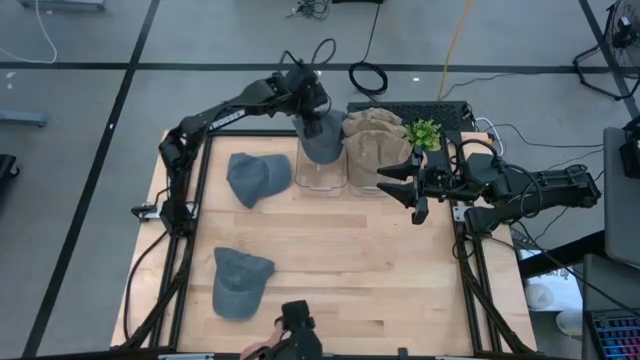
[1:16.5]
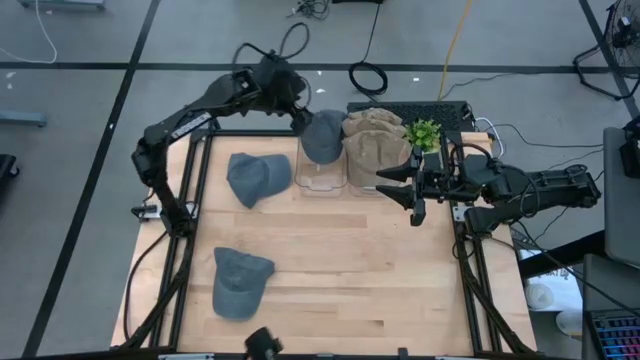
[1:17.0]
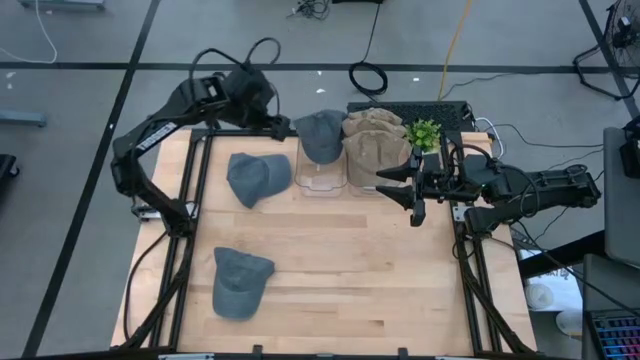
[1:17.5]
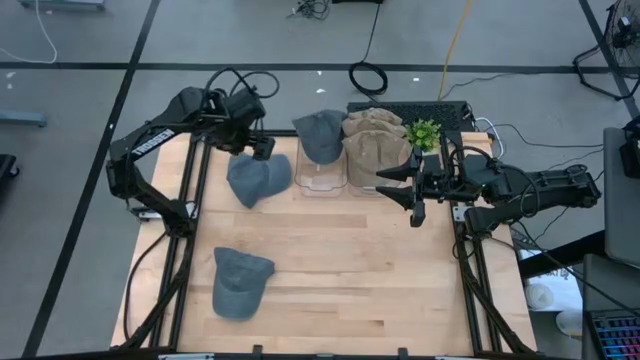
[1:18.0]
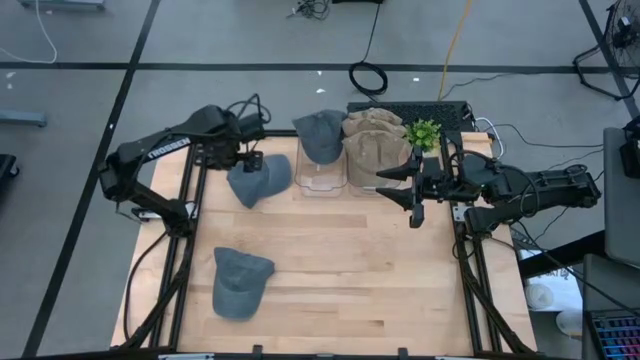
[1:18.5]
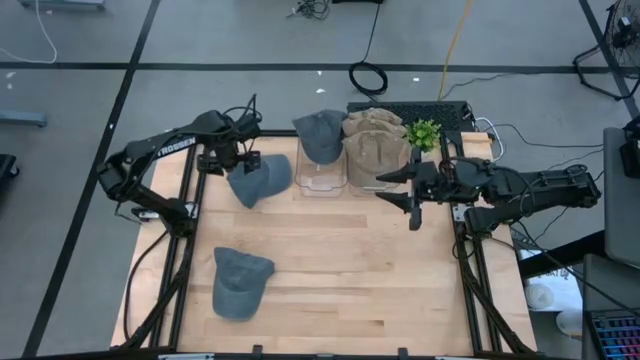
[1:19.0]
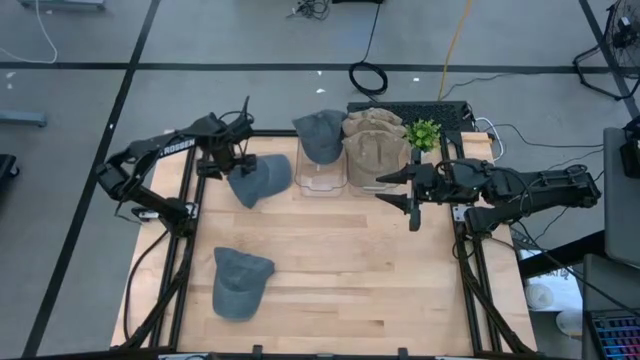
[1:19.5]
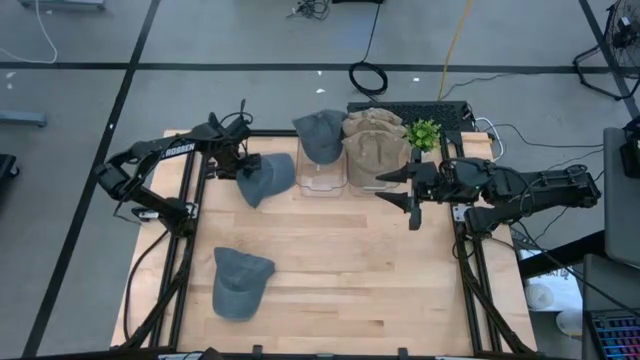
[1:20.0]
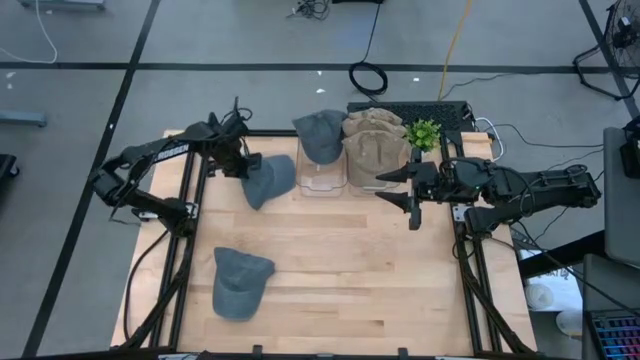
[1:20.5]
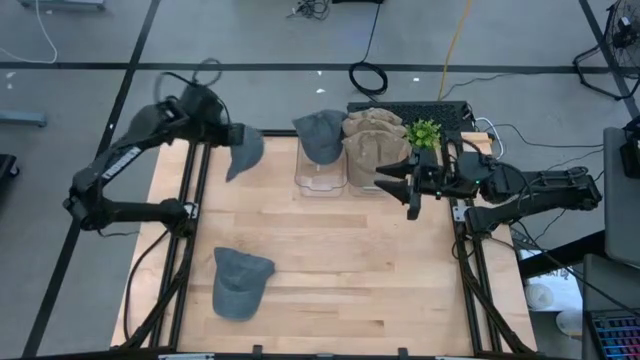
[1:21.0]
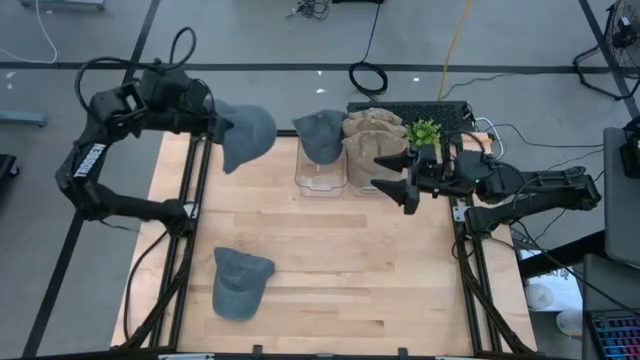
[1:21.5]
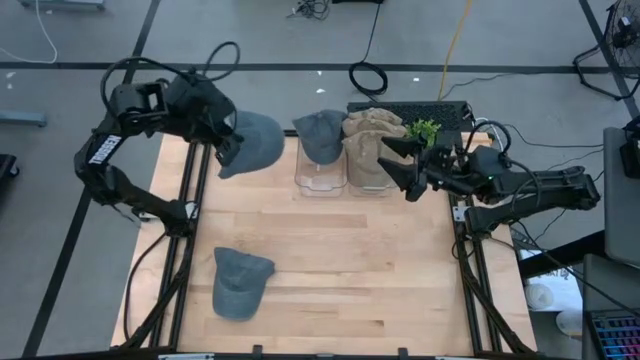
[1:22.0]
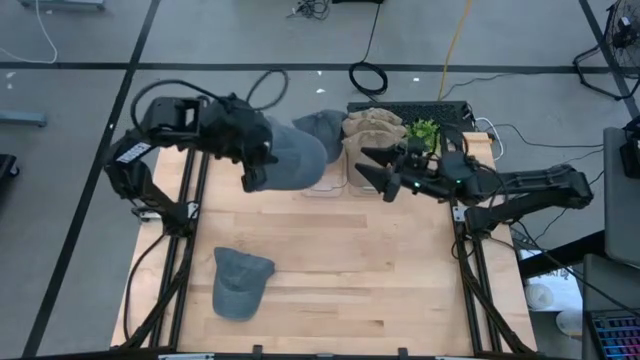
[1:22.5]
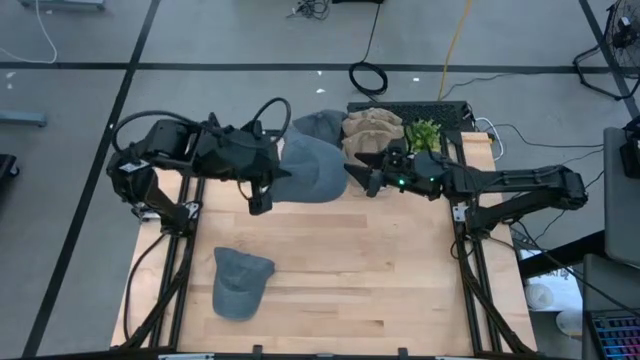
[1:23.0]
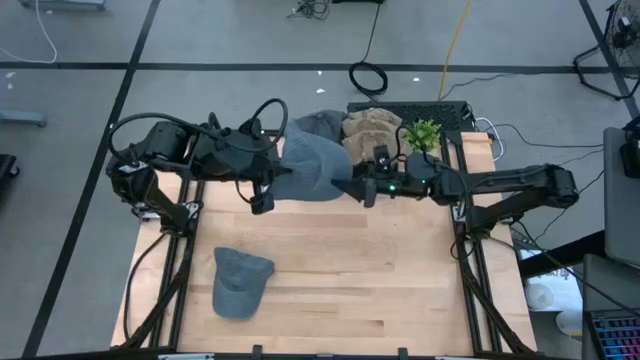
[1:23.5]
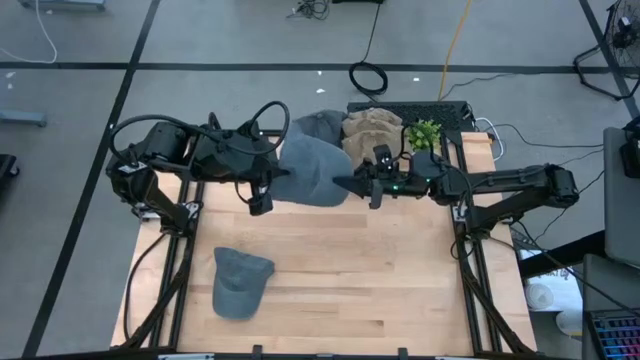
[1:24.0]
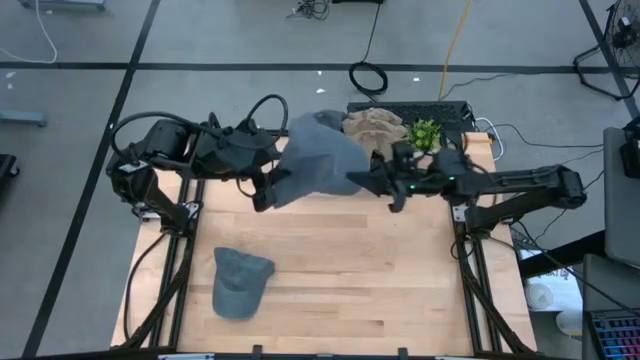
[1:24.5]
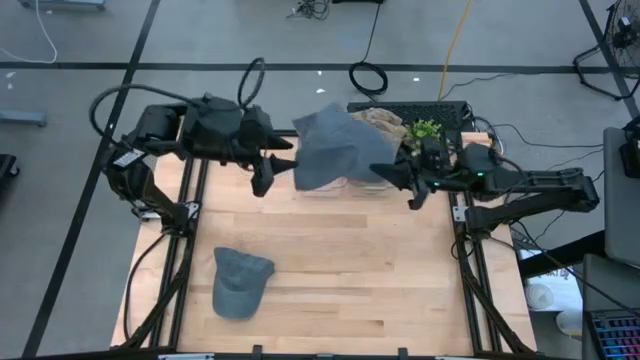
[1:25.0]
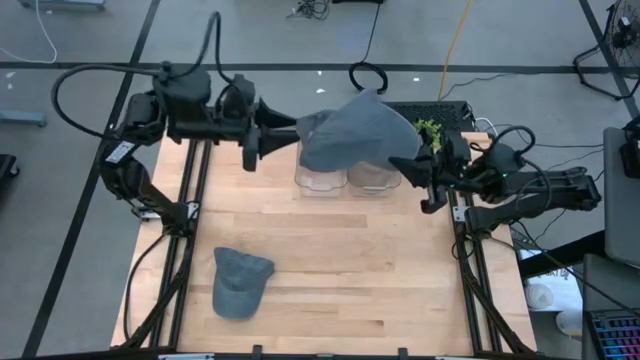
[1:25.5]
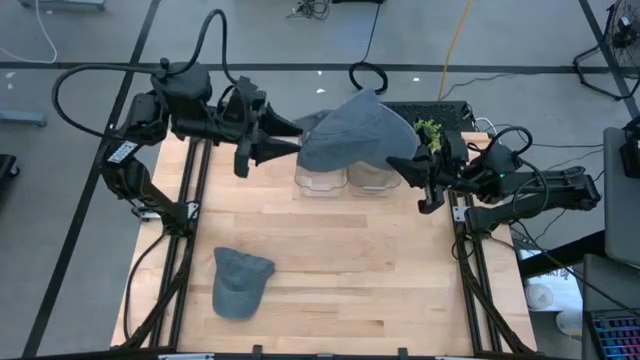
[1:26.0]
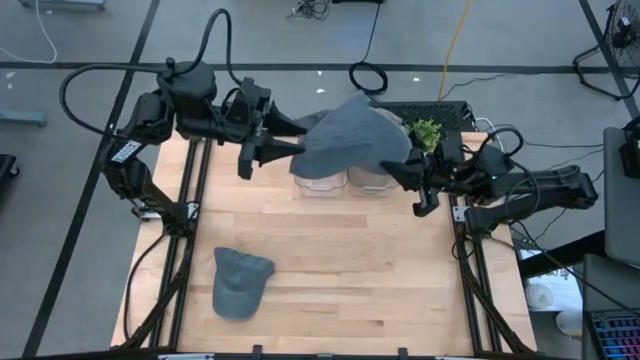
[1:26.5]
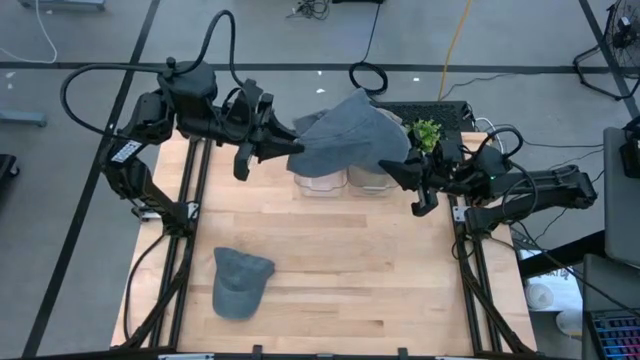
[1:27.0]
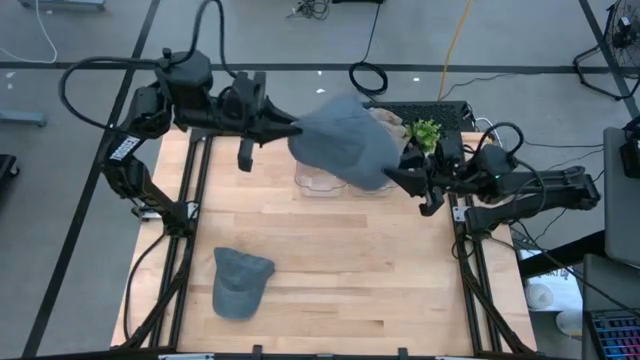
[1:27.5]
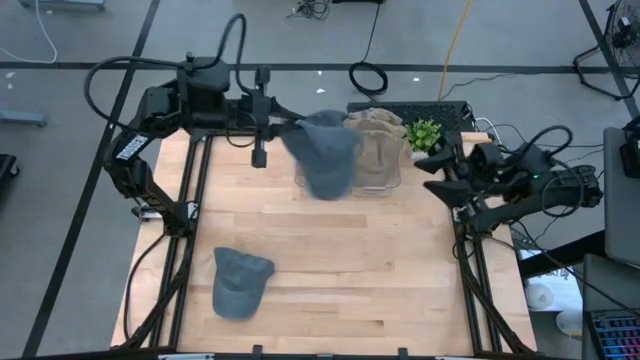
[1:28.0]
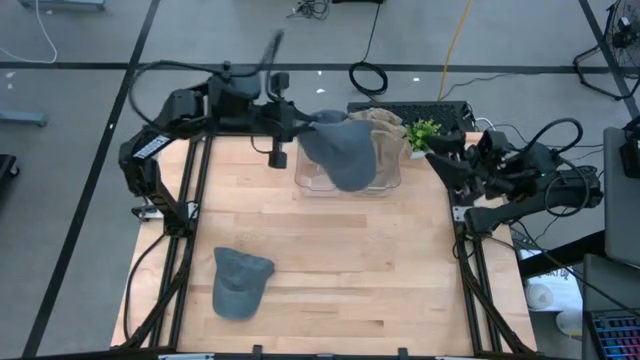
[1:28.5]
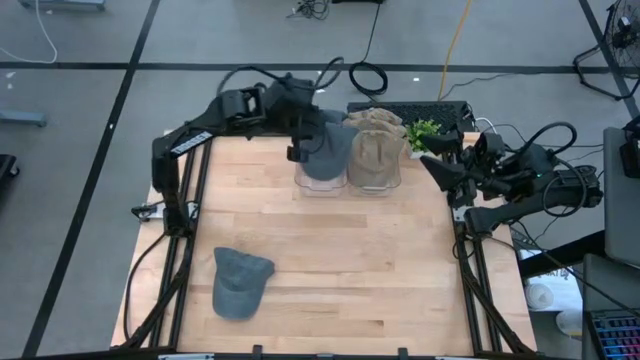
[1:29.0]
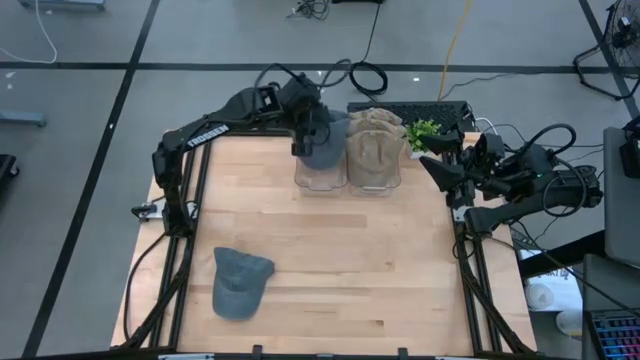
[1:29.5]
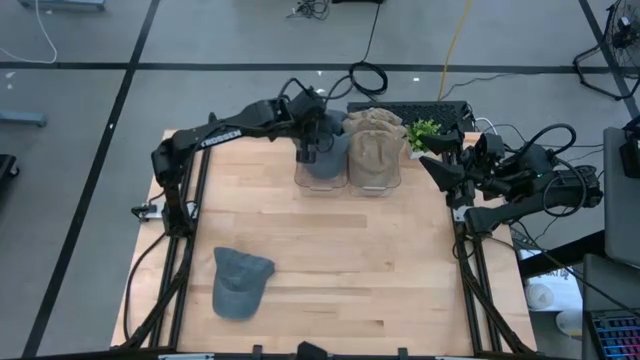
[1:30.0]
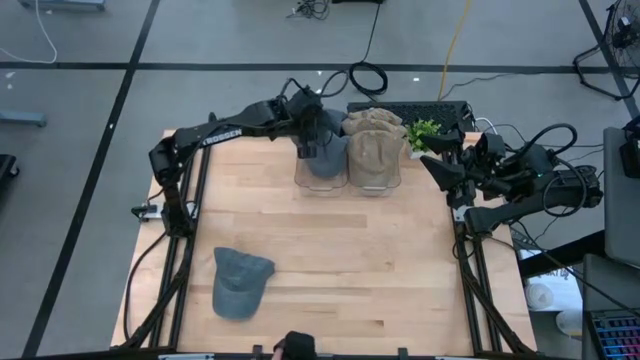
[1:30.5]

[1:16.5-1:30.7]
Task: Pick & Place hat
Put the top blue cap into the left transparent bin

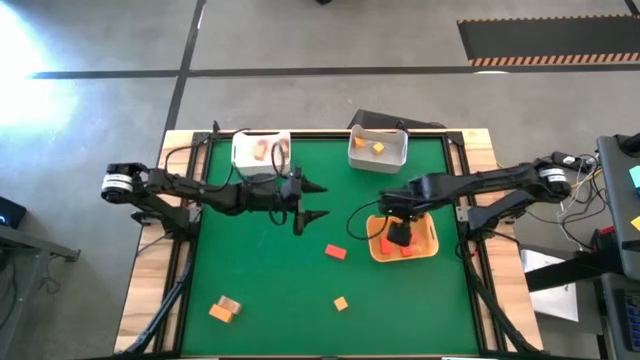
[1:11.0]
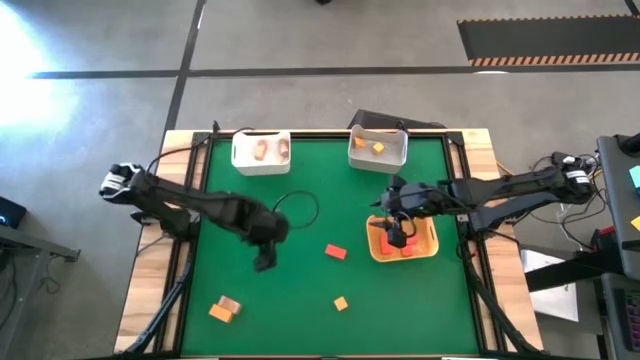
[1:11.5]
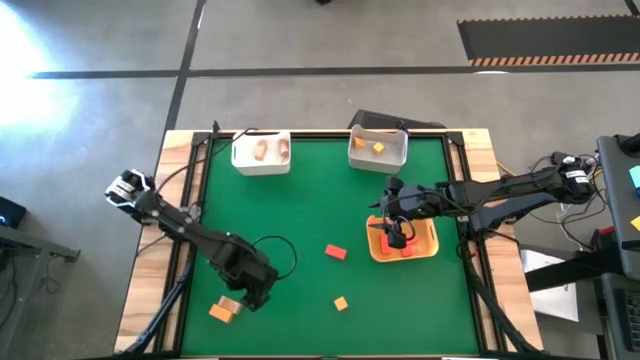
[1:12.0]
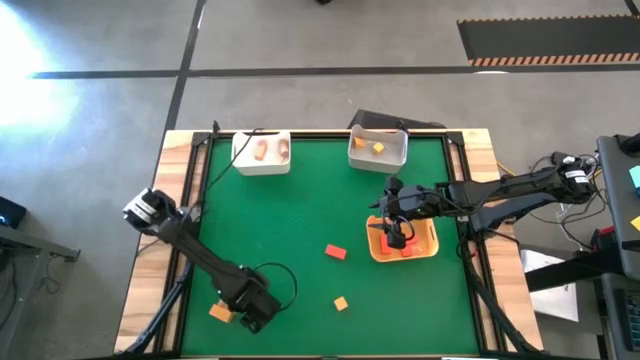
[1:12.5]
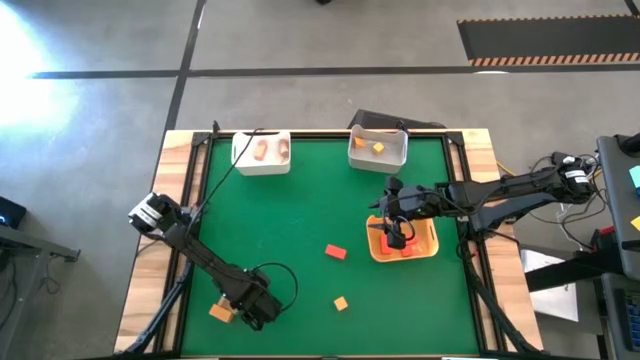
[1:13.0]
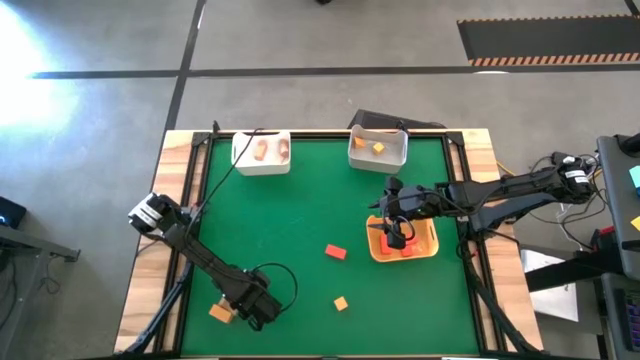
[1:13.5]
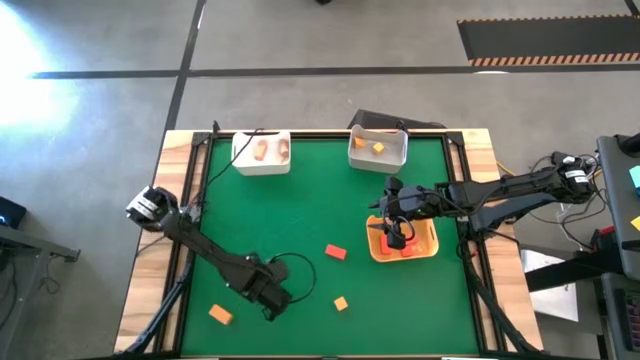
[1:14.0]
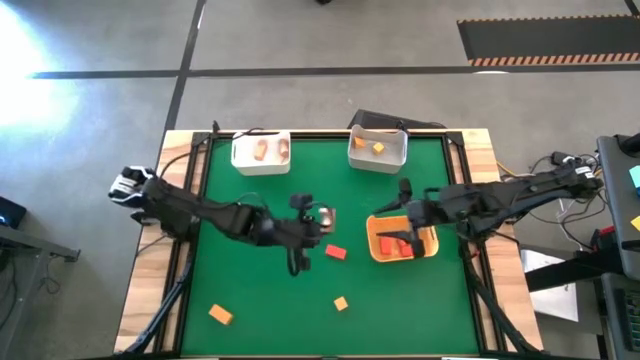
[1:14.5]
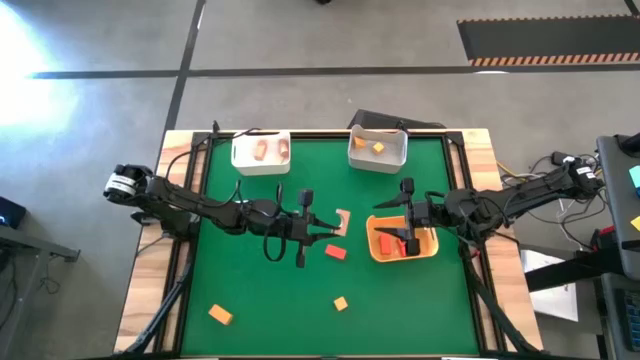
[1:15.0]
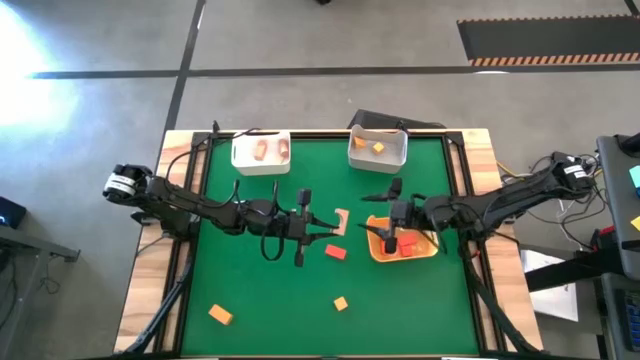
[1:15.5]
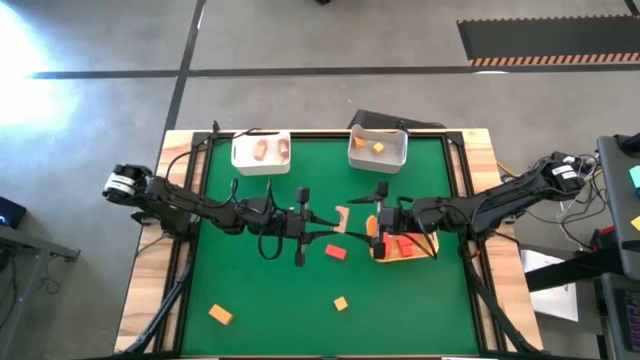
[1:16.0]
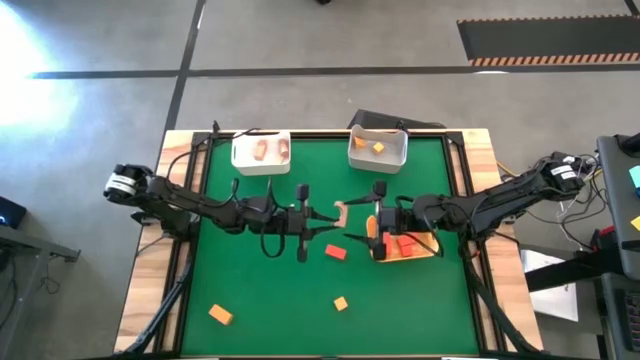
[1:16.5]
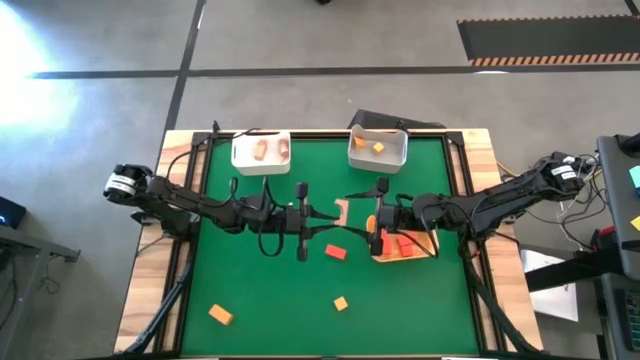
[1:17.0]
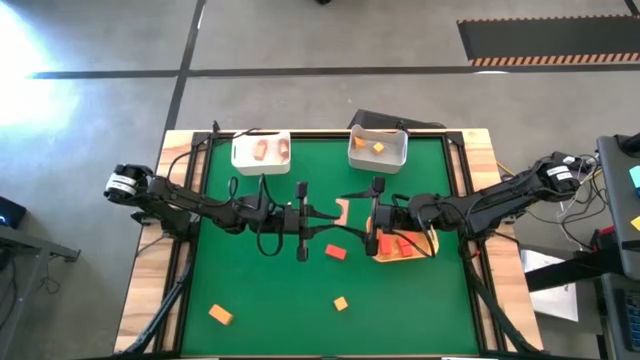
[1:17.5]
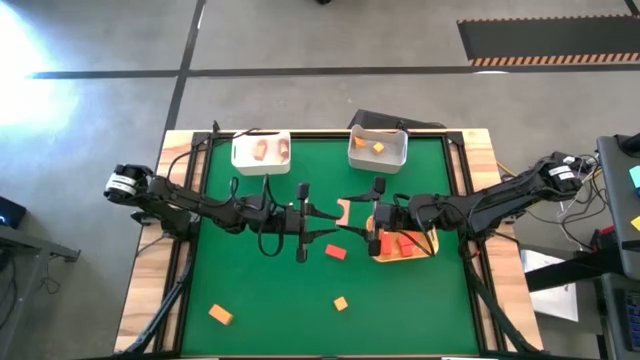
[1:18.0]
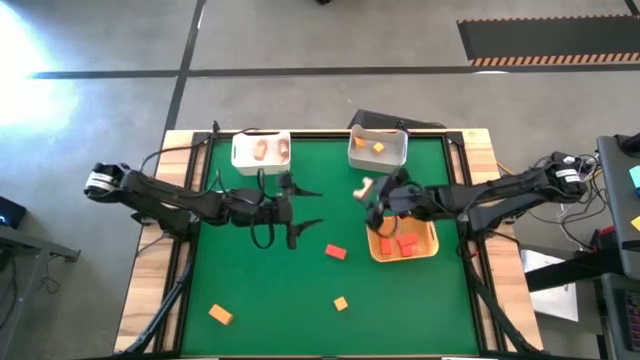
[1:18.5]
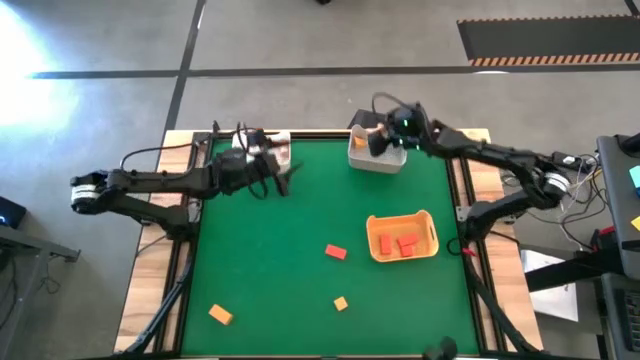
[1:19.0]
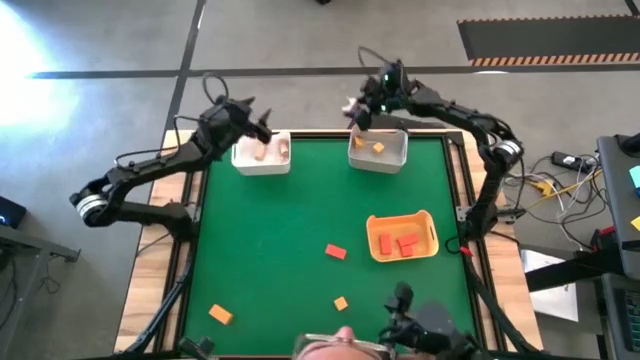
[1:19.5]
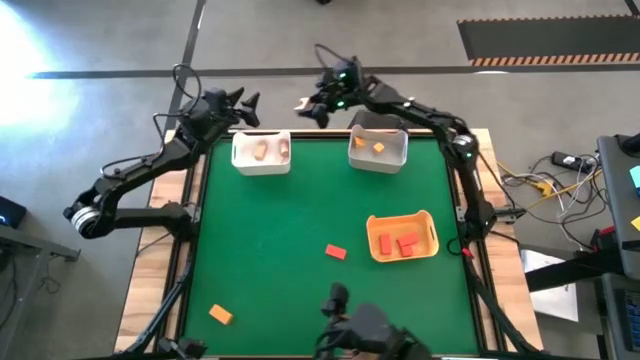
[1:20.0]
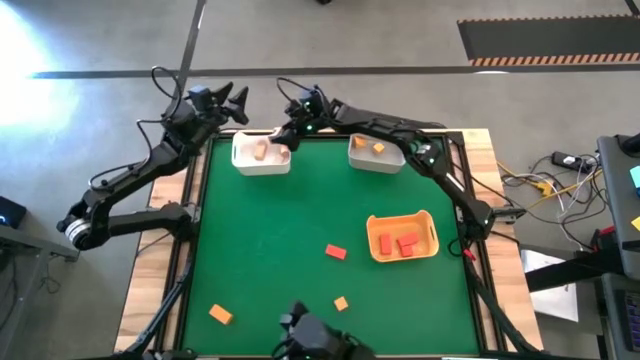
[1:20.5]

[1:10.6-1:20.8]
Task: Sort & place blocks by color
Put the brown block into the white bin
